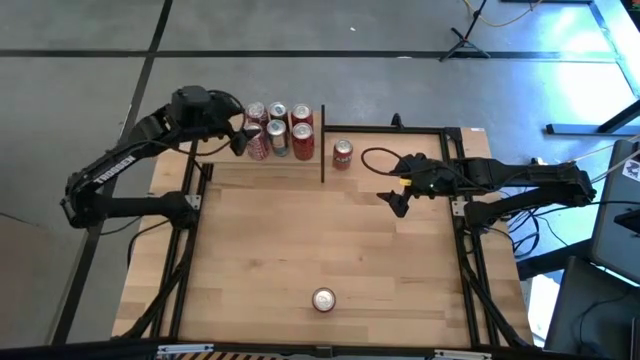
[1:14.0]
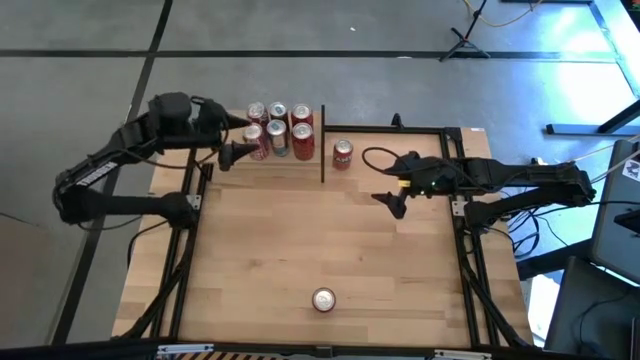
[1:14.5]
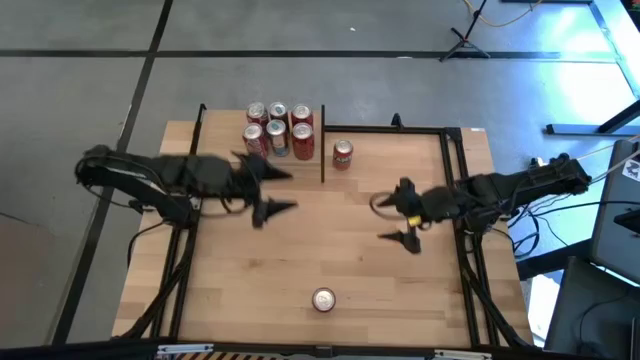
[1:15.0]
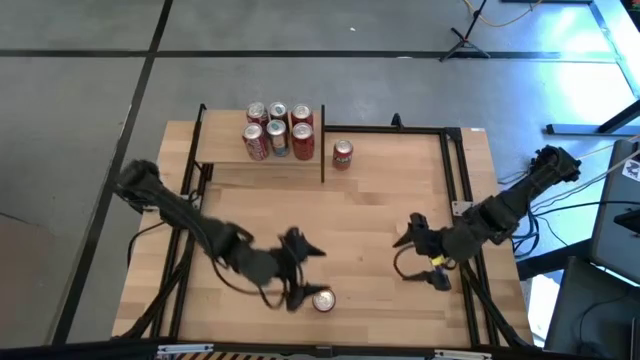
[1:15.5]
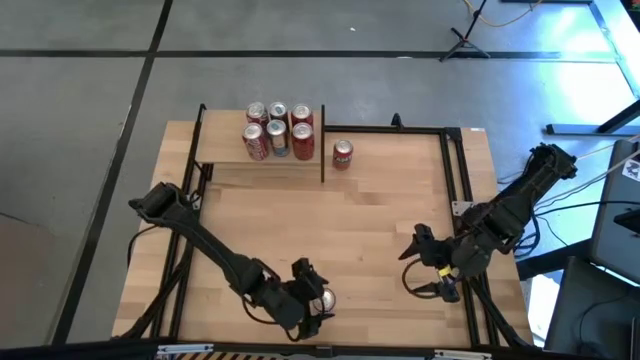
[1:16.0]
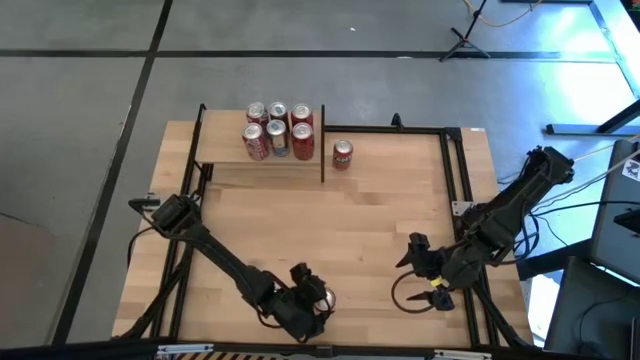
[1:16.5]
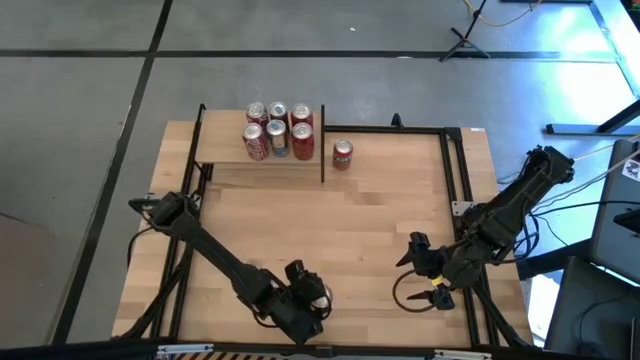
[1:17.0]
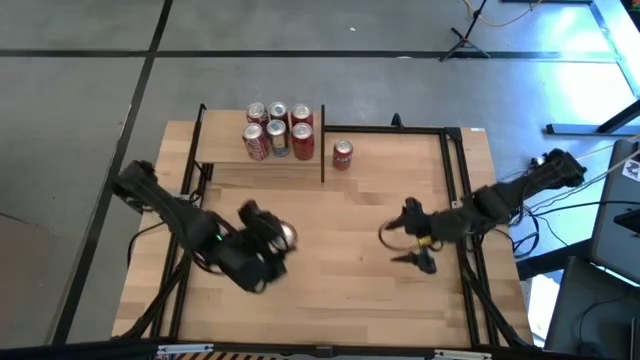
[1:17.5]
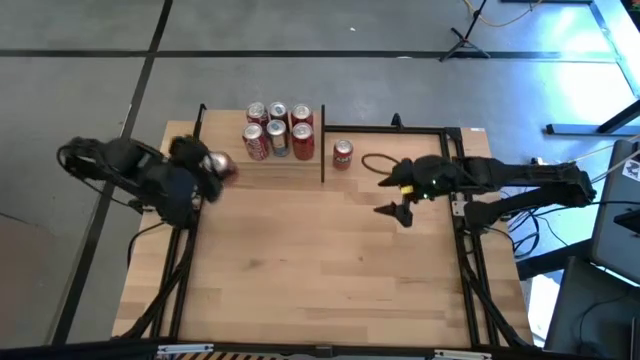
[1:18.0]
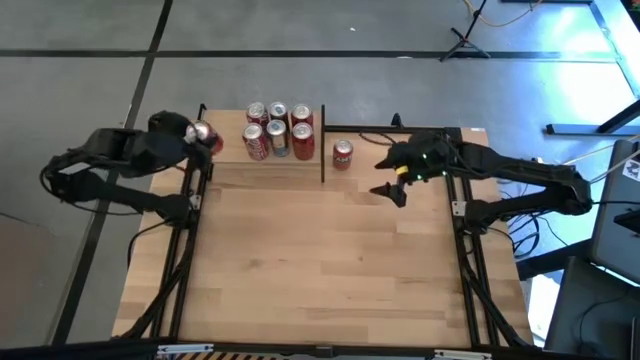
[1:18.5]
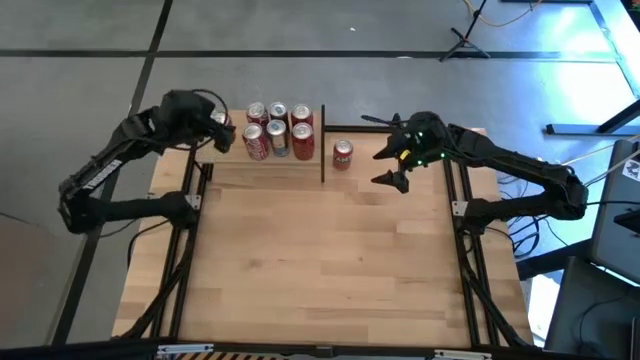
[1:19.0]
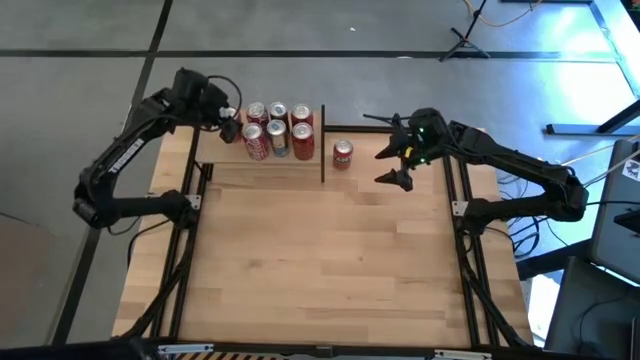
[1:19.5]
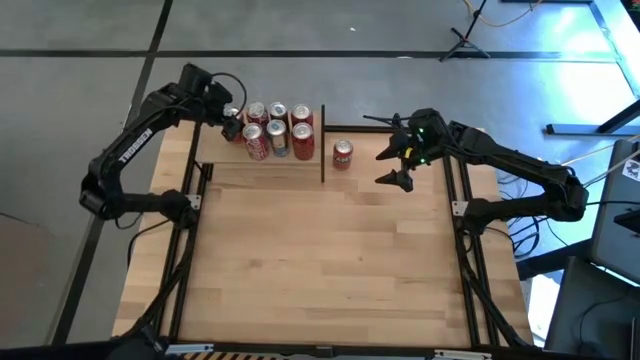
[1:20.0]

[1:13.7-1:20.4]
Task: Place canned beverage on shelf
Put the bottom red soda can on the shelf

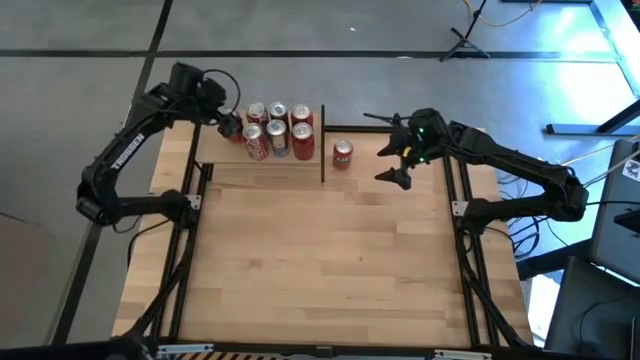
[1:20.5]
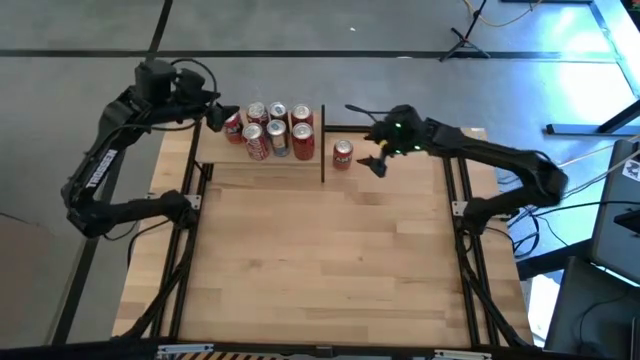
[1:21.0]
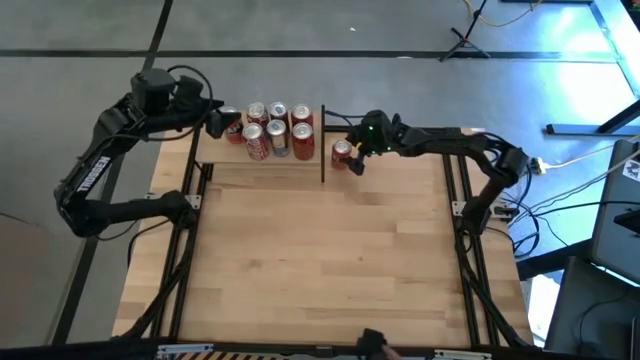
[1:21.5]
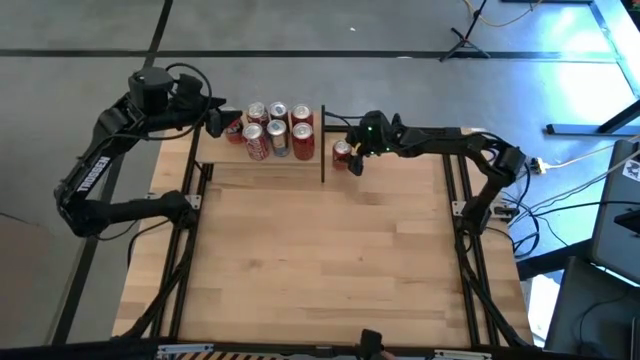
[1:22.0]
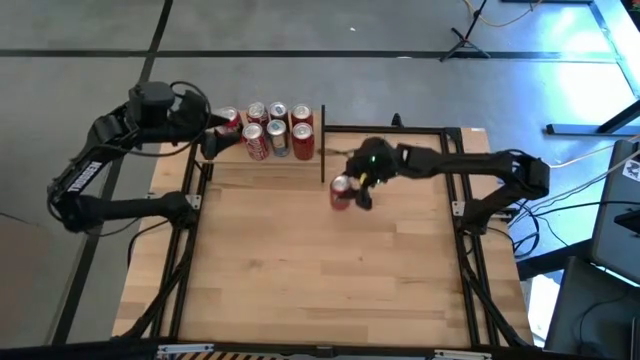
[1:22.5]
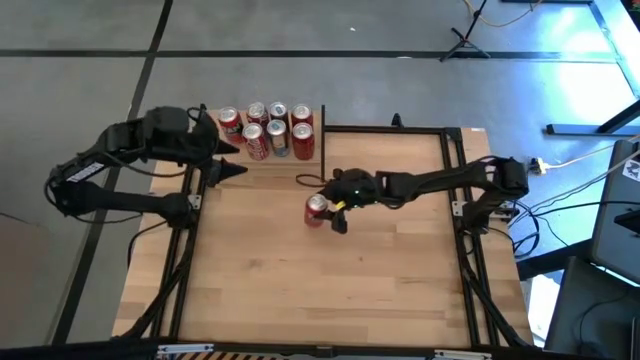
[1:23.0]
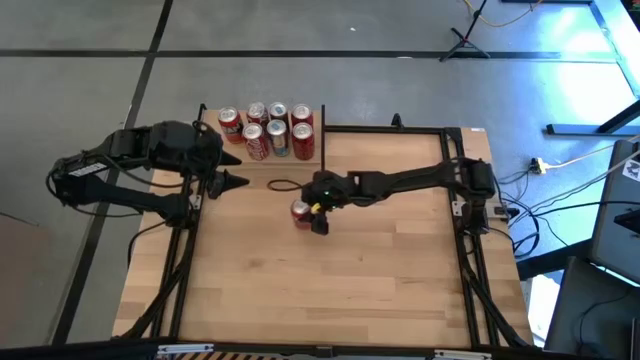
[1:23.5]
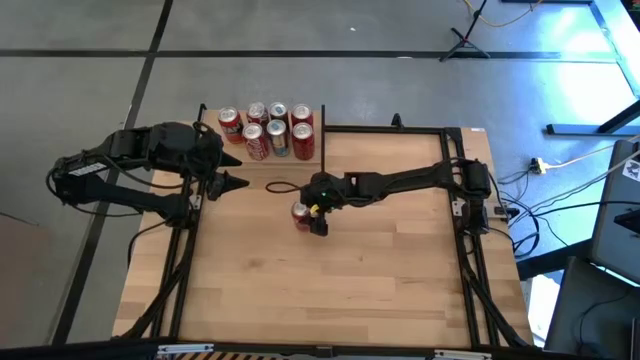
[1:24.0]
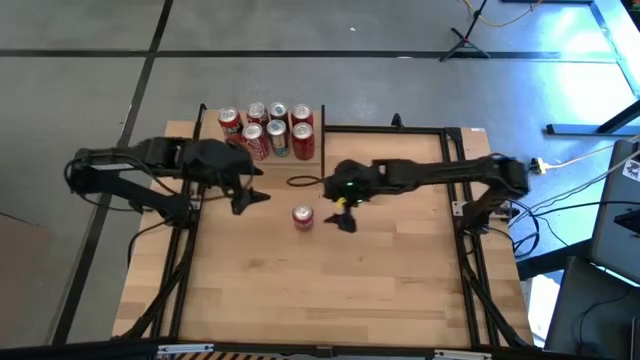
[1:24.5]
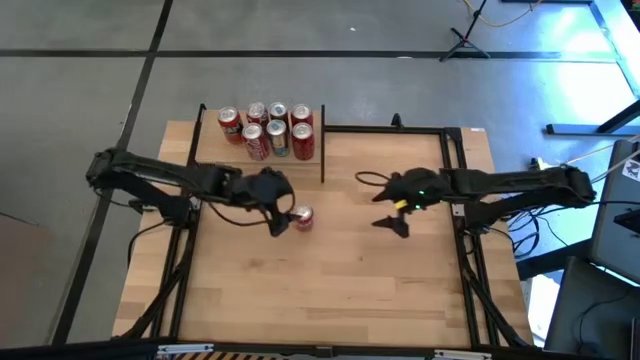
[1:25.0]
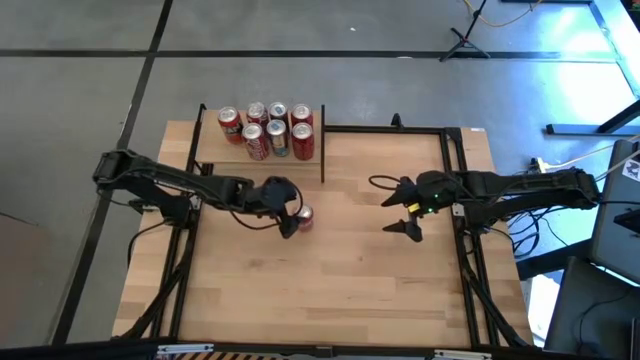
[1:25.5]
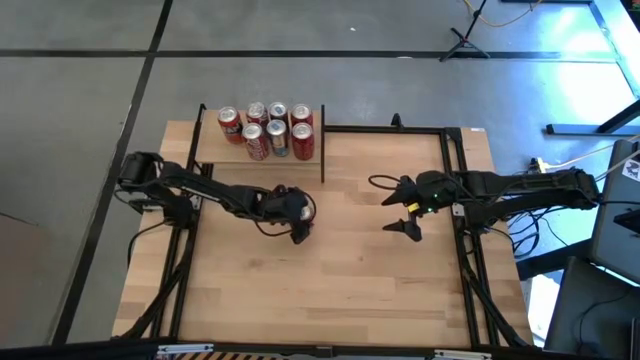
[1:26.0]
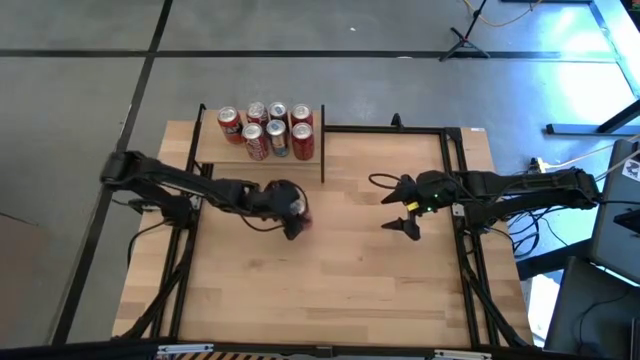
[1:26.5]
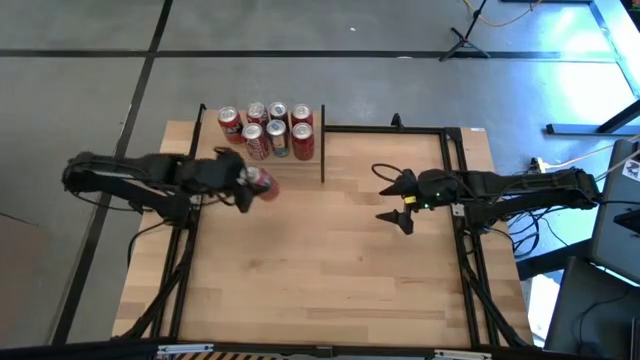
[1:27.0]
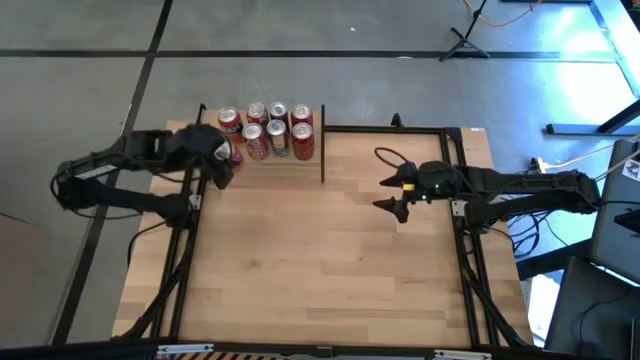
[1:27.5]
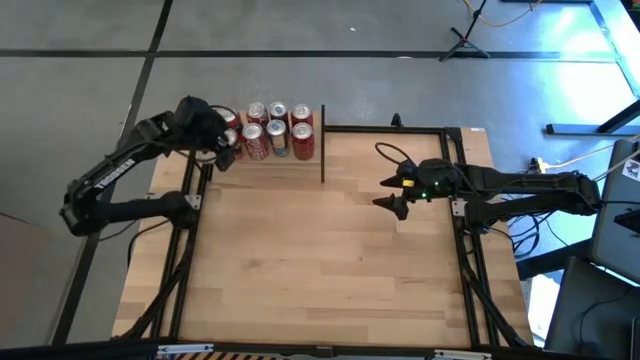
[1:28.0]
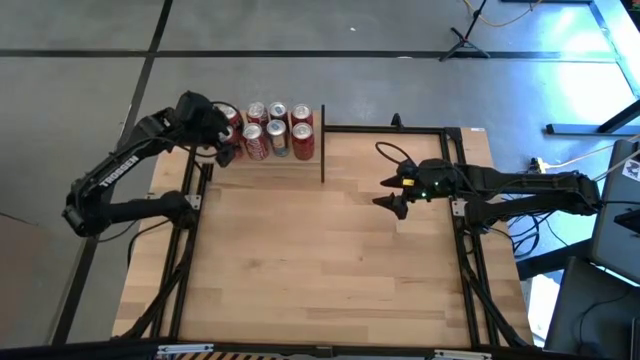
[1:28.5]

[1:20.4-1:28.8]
Put the red soda can on the shelf aligned with the other red soda can

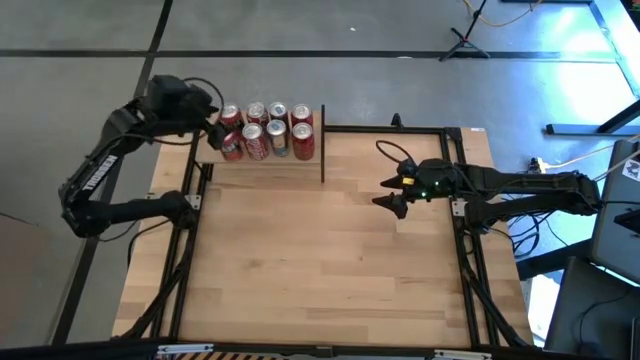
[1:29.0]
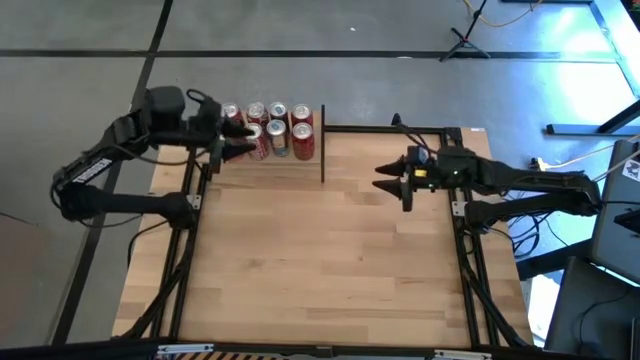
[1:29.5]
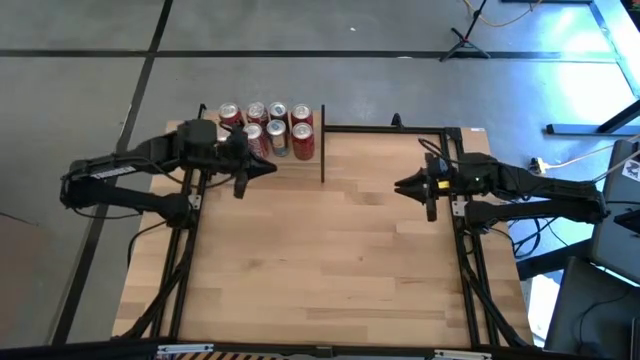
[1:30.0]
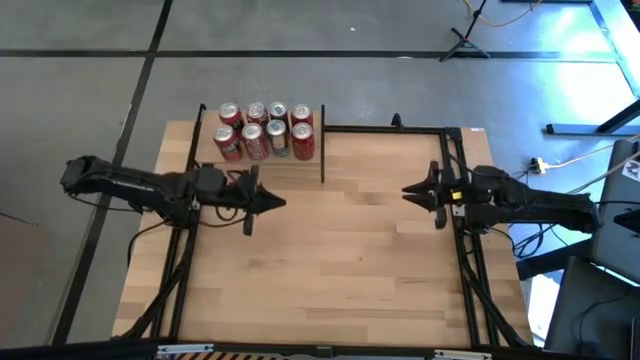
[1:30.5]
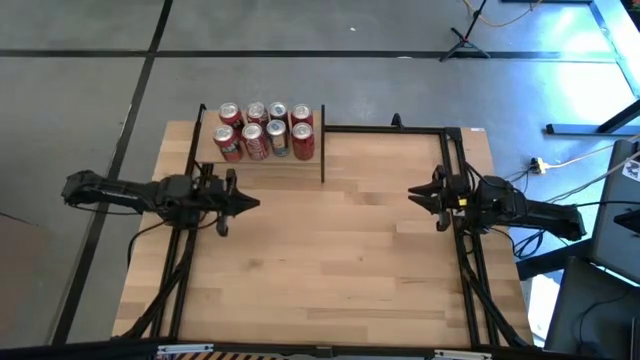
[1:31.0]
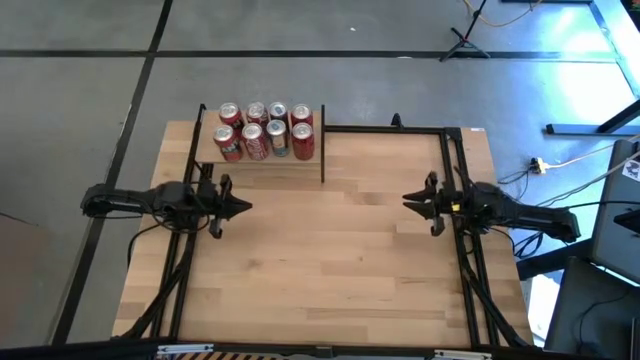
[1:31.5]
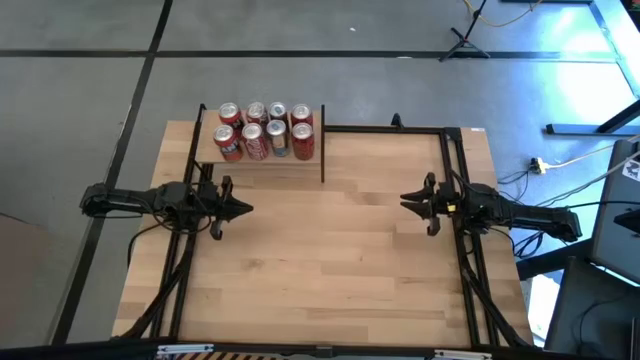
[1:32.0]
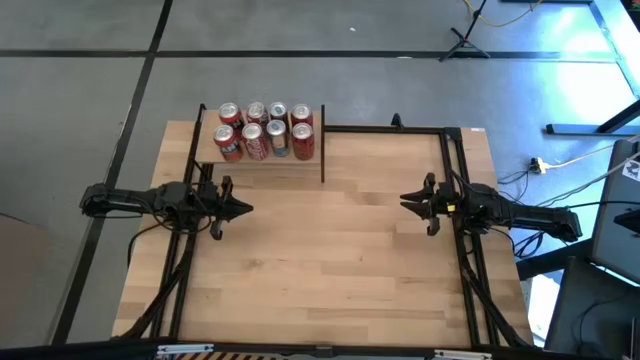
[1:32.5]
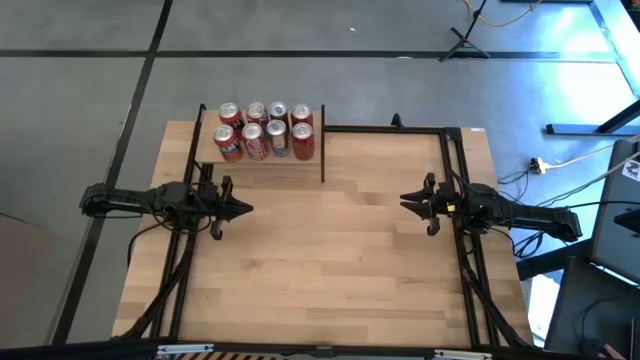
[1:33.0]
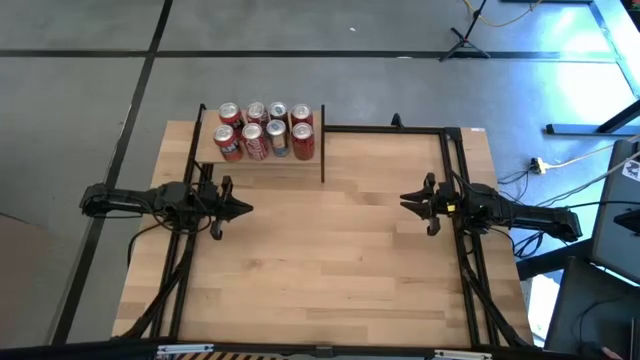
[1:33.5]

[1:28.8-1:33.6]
Return to Home Position

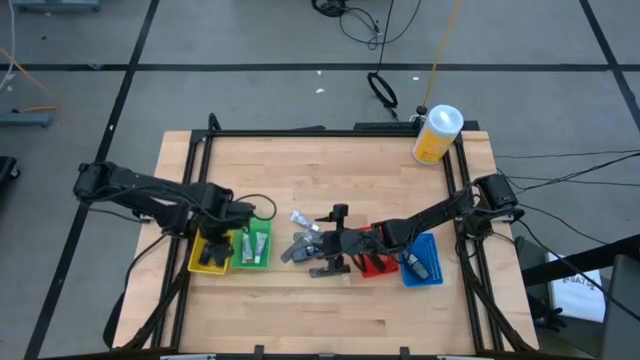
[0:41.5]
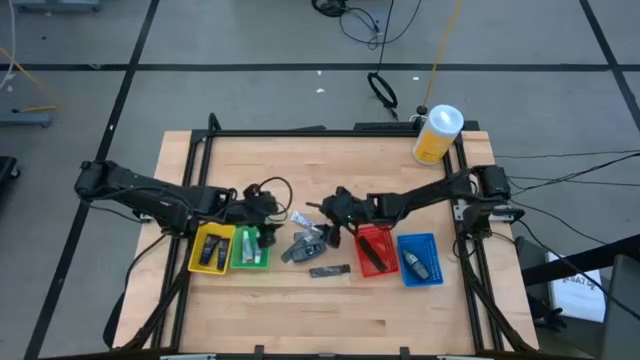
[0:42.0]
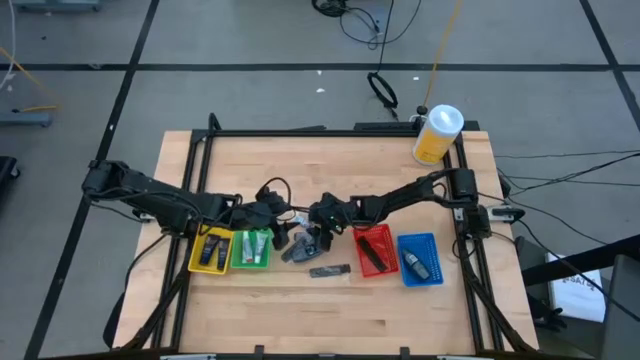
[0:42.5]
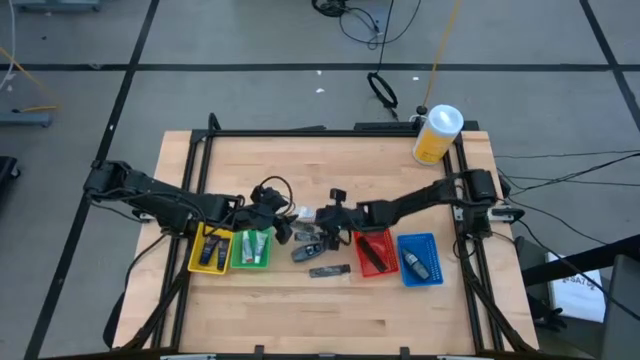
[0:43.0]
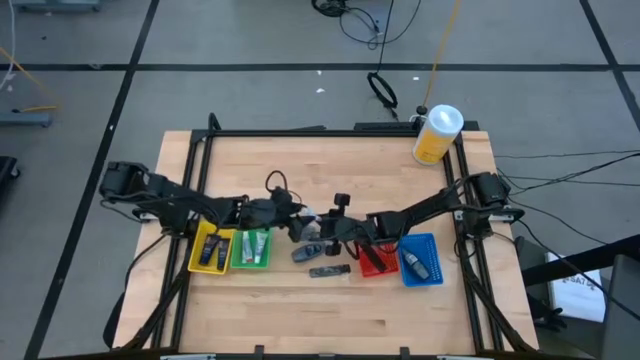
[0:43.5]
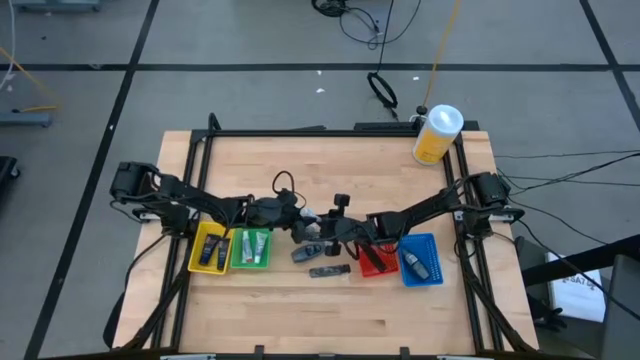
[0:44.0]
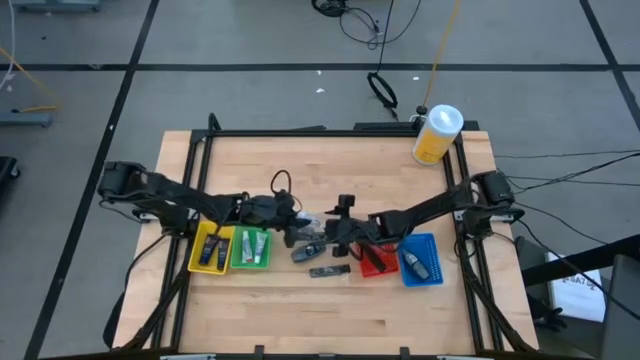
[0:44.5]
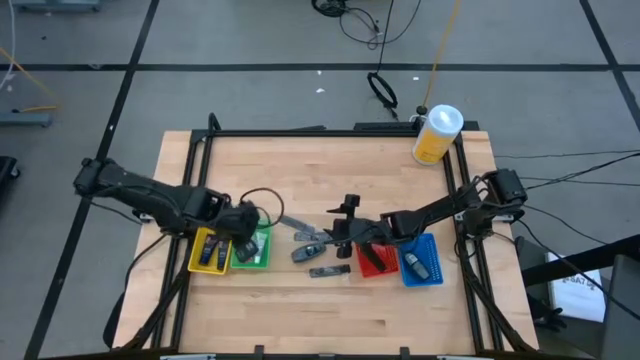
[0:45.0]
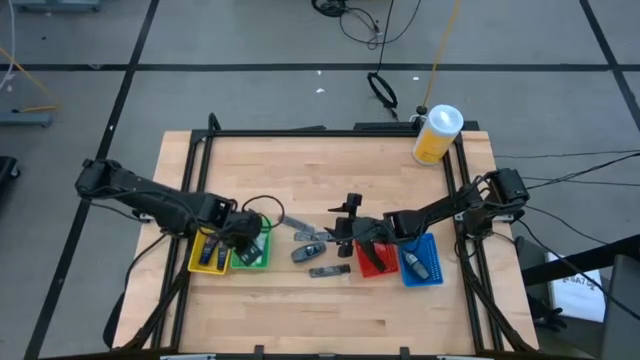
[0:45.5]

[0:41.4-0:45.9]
Task: Pick & Place Travel size toiletries
Put the white toothpaste into the green bin
